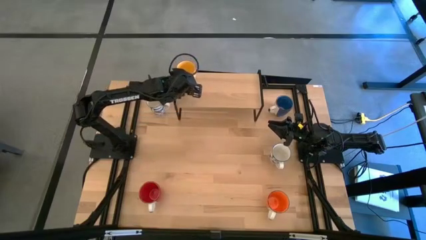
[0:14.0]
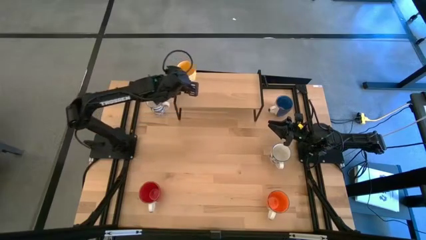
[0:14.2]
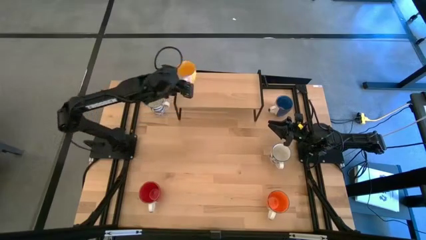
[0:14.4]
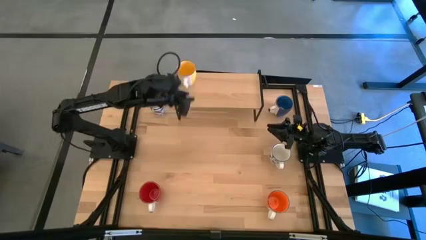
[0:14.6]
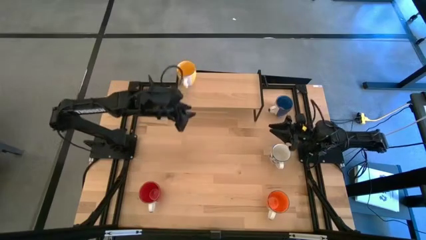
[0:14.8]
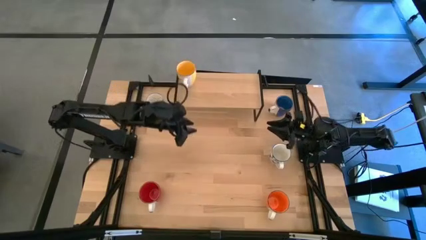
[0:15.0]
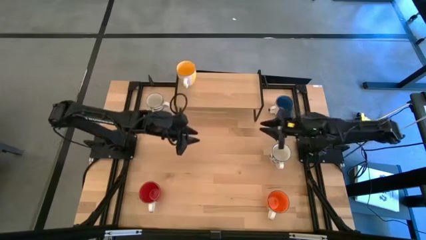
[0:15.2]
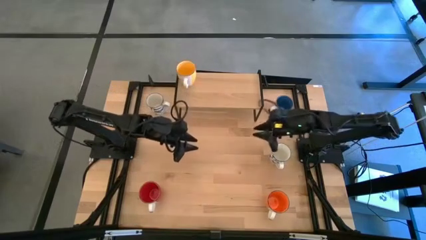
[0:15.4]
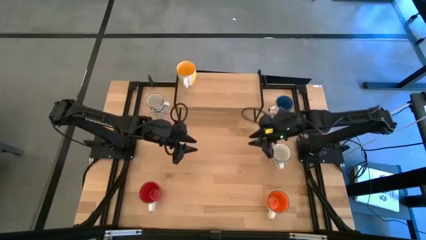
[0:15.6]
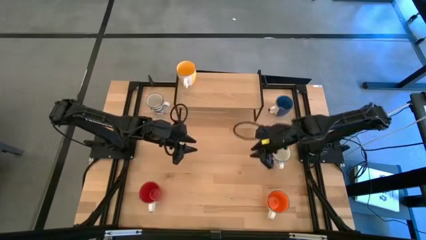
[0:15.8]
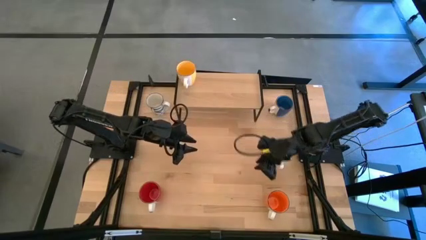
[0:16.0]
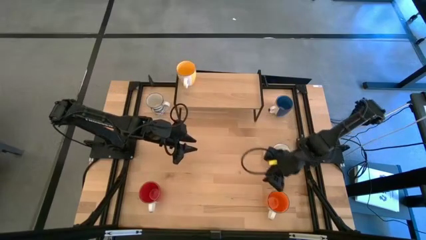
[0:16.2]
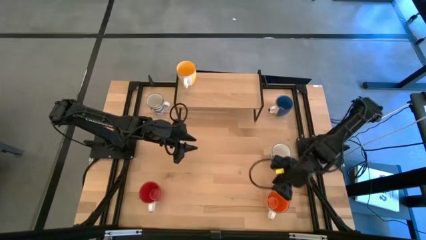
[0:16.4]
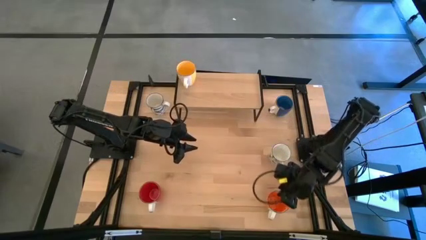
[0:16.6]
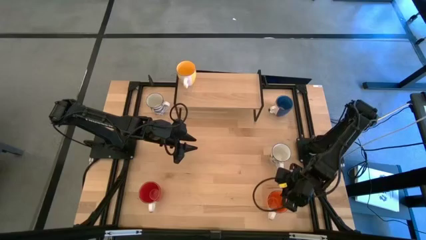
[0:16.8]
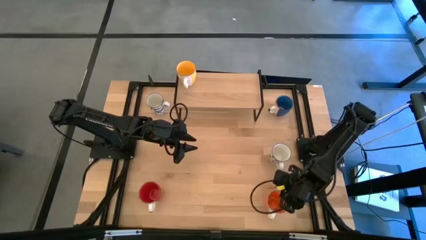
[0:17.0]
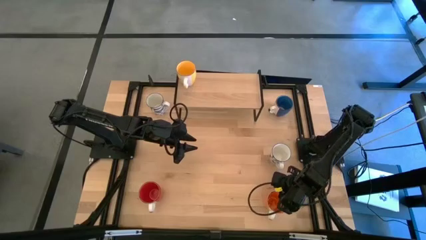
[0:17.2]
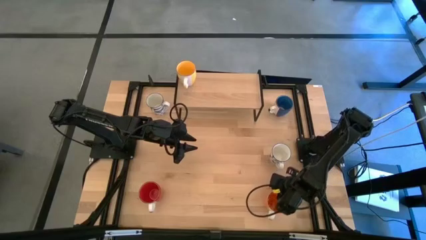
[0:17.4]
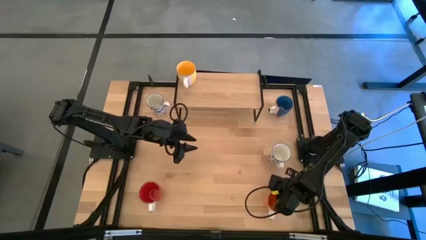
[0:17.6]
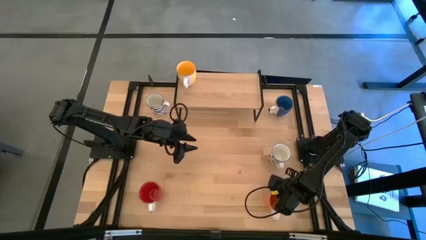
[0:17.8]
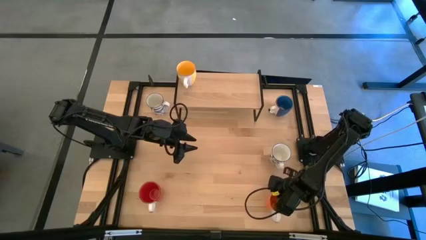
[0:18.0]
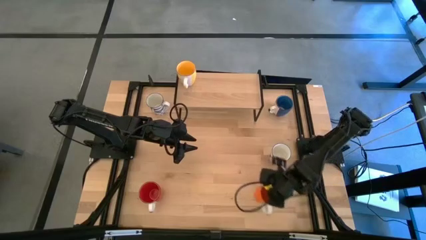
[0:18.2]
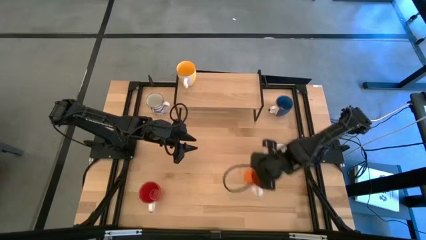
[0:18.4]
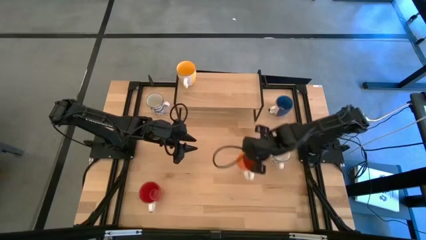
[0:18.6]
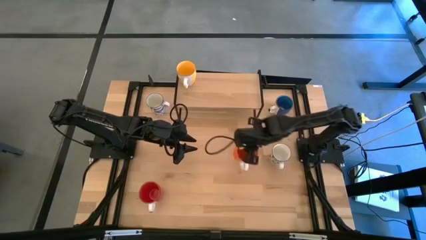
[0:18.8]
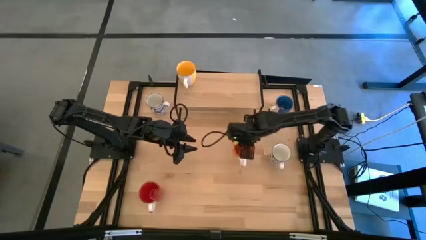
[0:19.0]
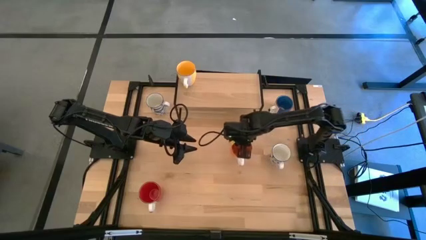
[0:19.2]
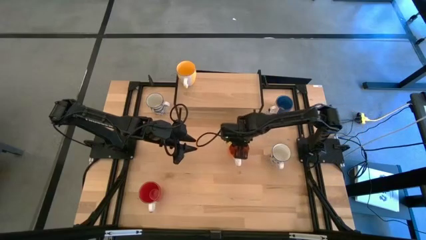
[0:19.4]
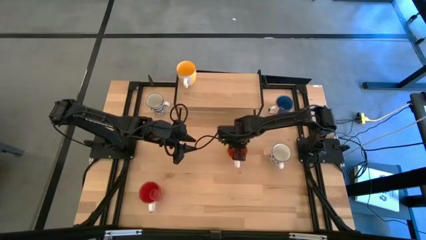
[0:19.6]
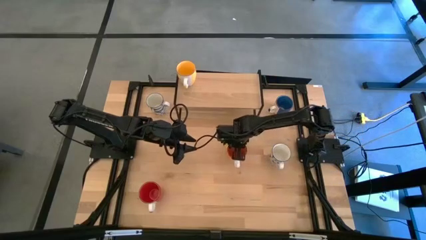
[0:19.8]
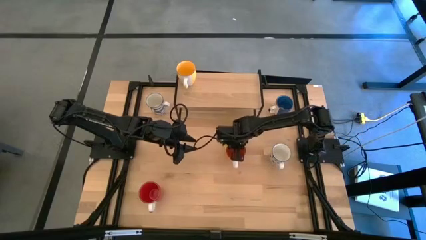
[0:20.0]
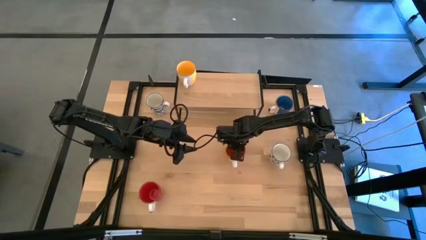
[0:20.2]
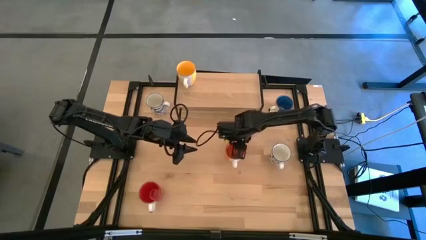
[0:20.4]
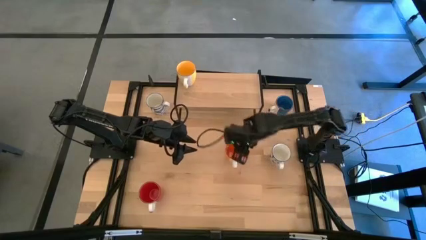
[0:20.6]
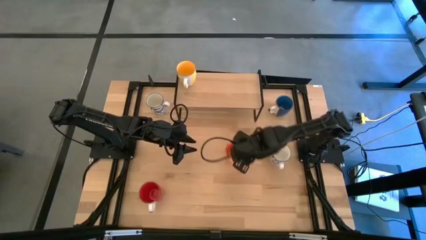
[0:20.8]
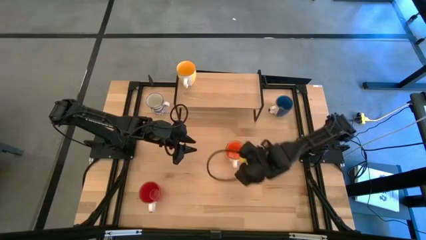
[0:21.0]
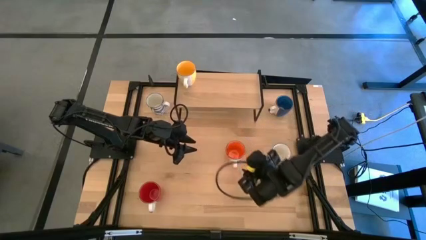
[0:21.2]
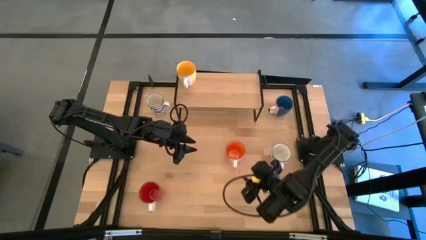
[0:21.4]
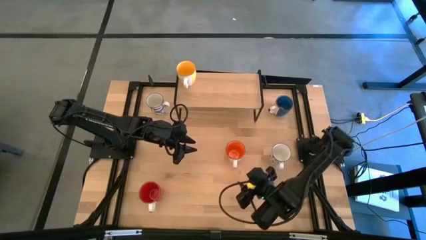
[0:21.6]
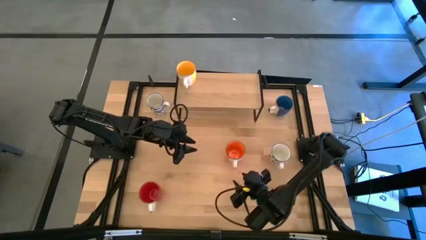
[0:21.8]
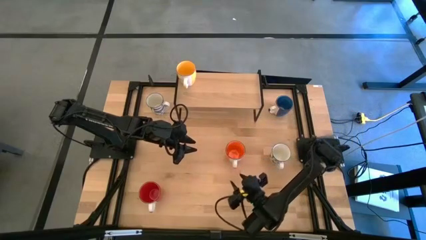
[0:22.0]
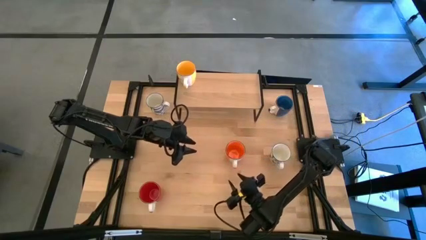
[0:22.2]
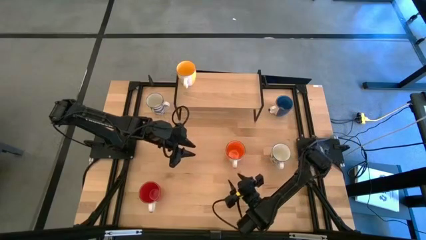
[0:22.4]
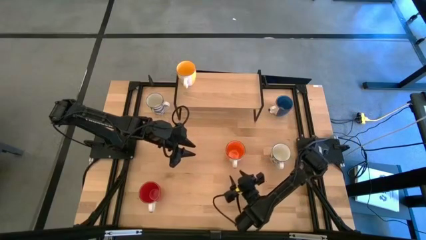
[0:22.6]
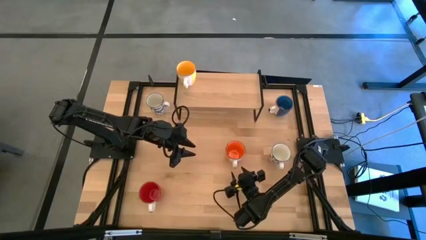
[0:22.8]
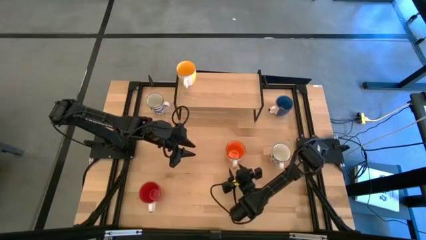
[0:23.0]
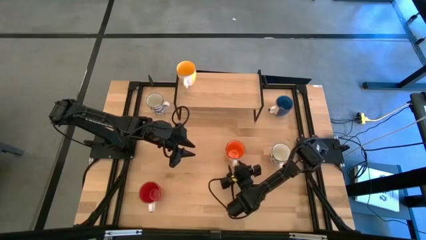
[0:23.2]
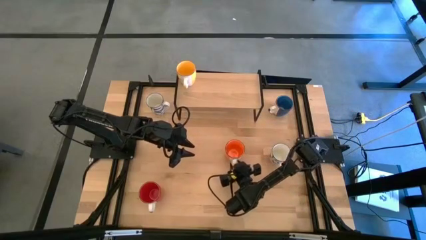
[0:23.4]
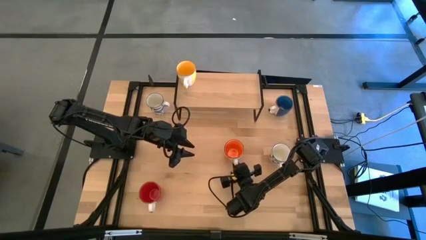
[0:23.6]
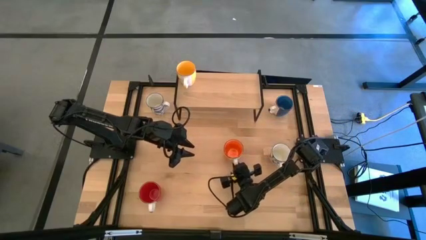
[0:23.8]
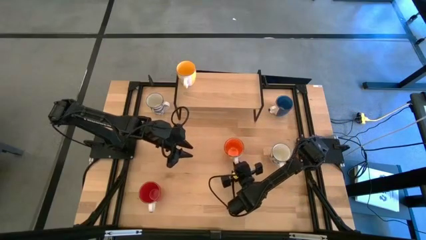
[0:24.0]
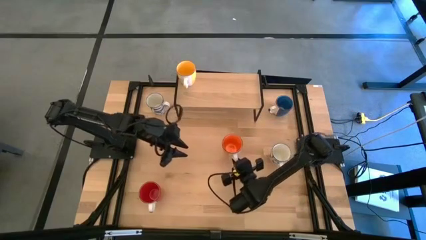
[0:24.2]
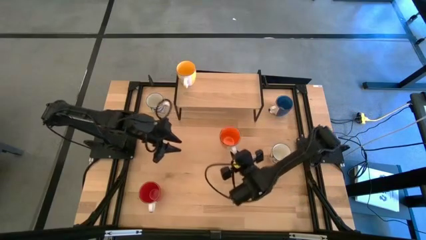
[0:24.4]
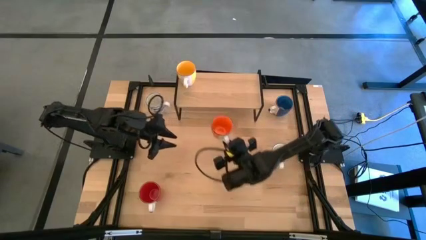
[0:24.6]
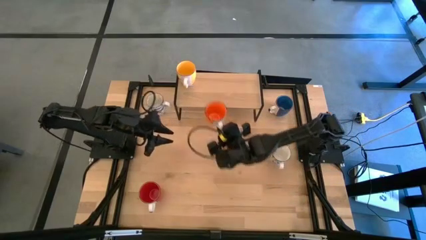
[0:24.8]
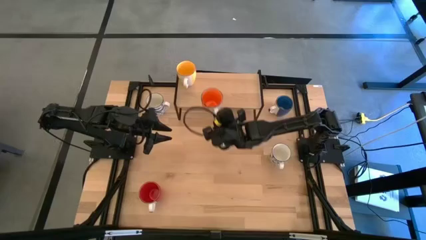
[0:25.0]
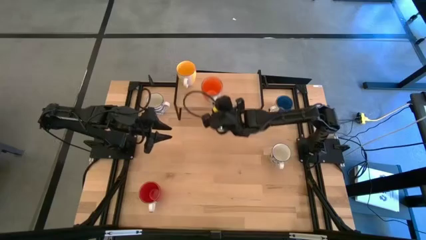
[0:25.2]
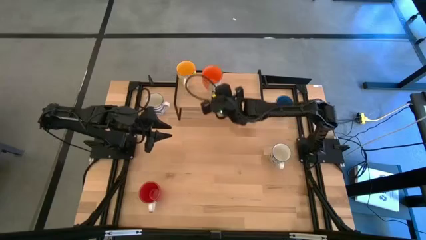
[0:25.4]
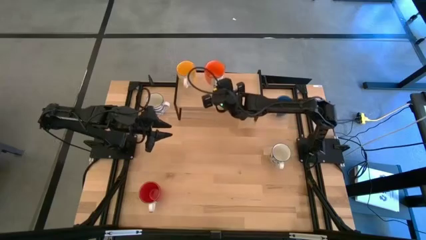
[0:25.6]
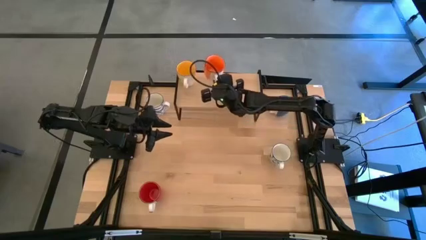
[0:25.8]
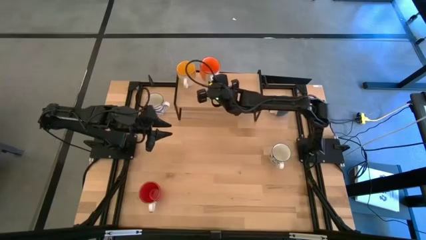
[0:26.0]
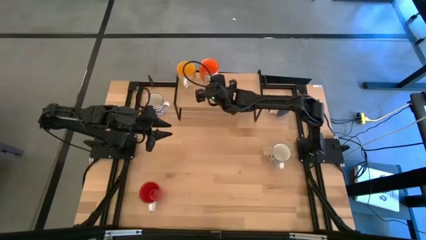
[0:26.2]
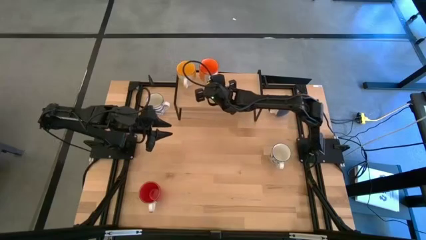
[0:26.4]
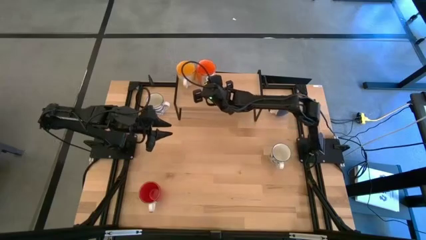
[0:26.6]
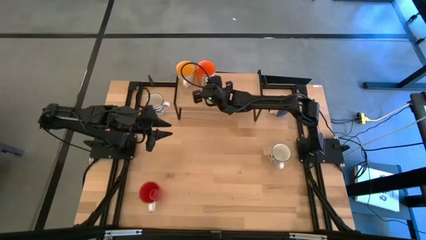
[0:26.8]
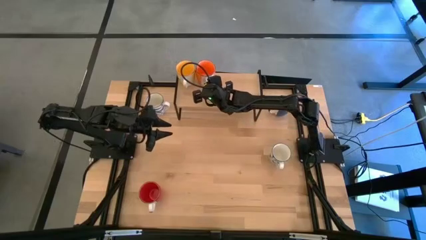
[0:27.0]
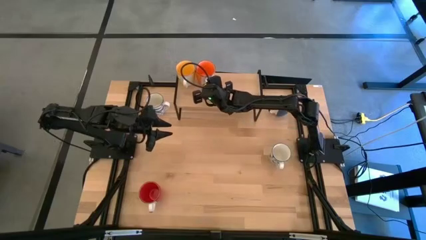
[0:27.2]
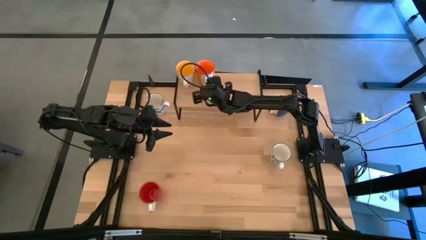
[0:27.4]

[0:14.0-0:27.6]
Task: Place coffee mugs
Put the orange mug on the shelf
